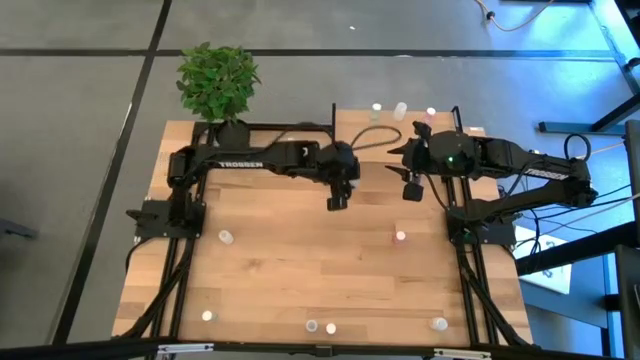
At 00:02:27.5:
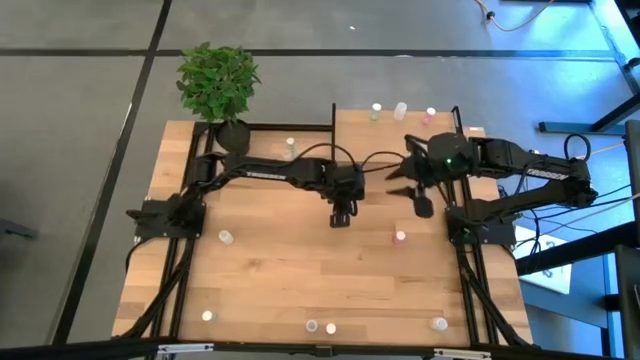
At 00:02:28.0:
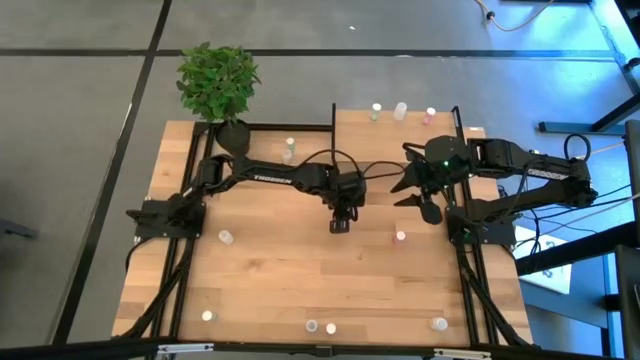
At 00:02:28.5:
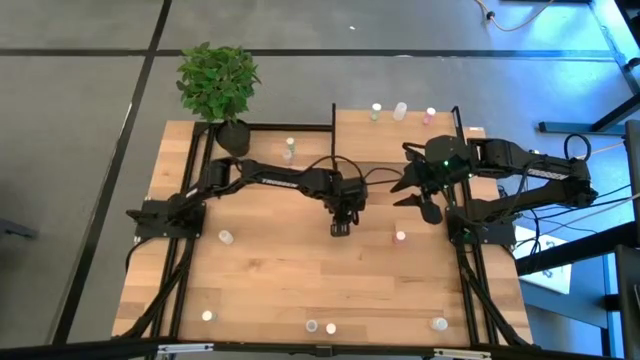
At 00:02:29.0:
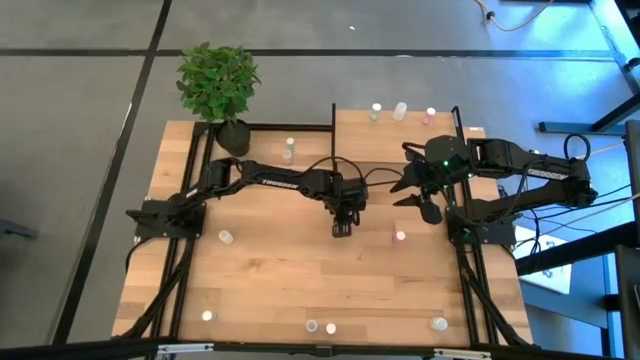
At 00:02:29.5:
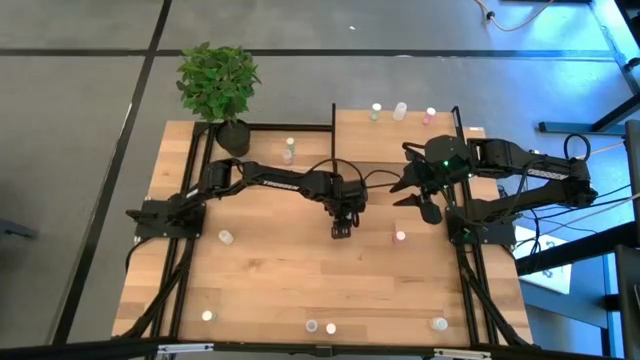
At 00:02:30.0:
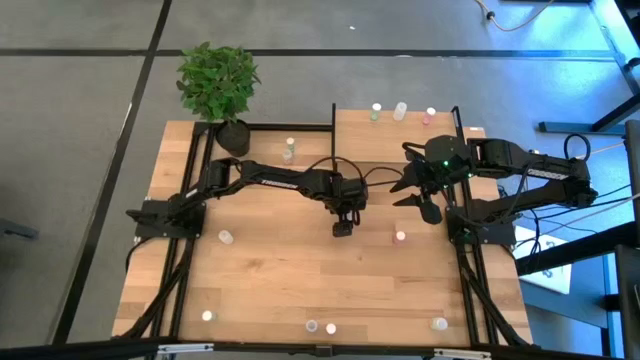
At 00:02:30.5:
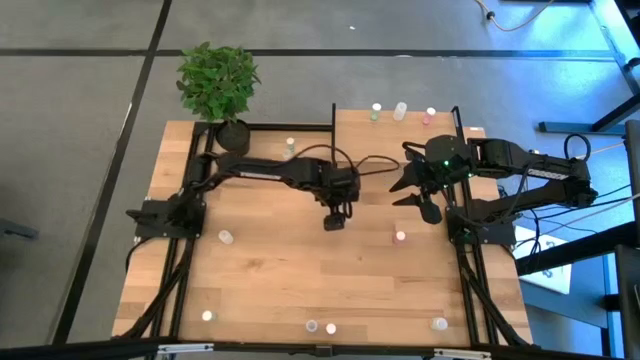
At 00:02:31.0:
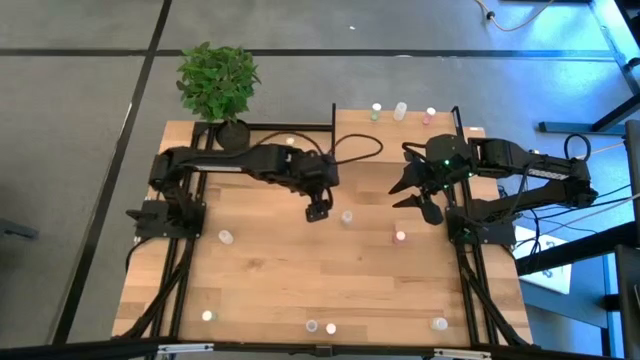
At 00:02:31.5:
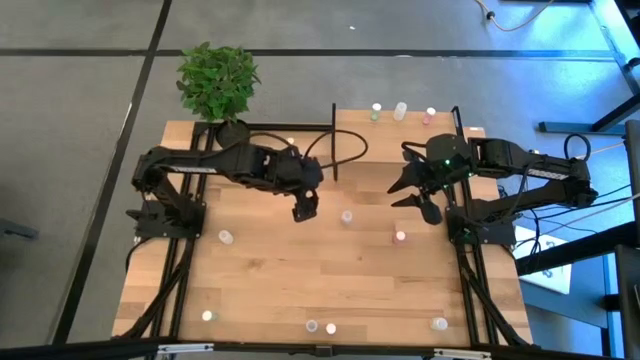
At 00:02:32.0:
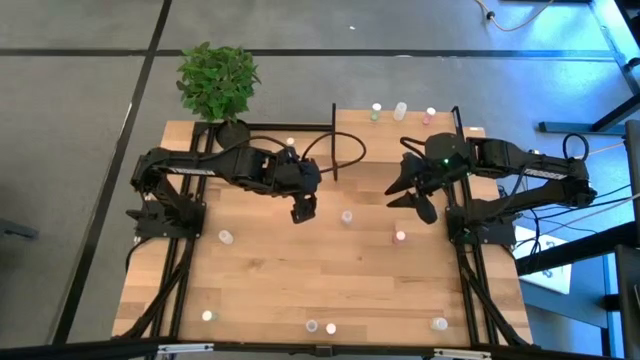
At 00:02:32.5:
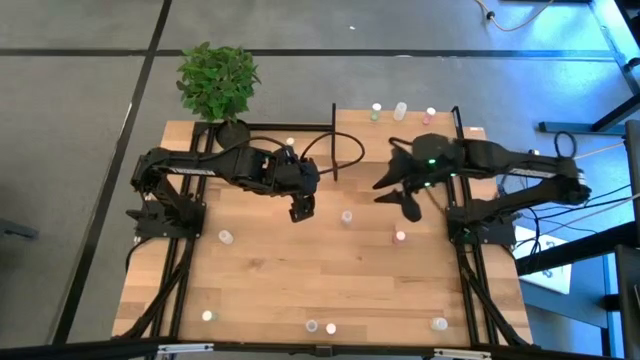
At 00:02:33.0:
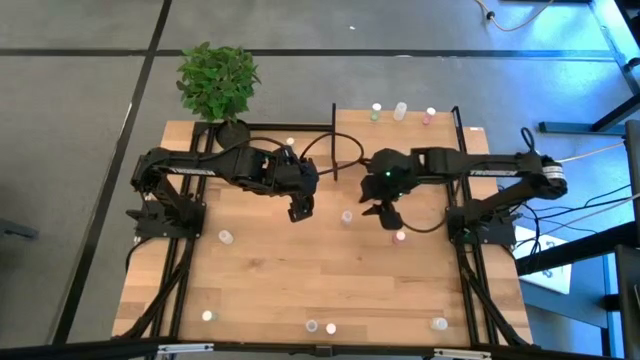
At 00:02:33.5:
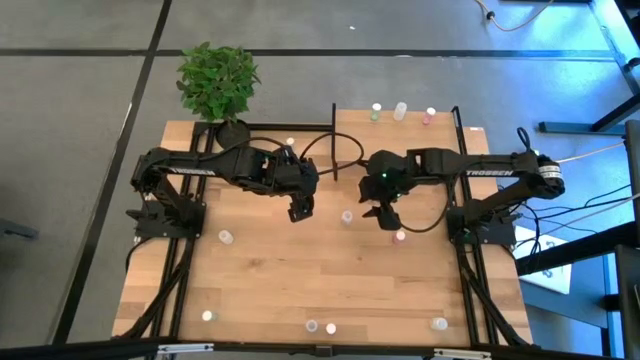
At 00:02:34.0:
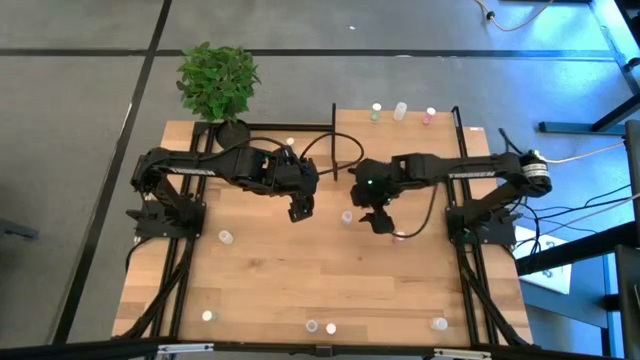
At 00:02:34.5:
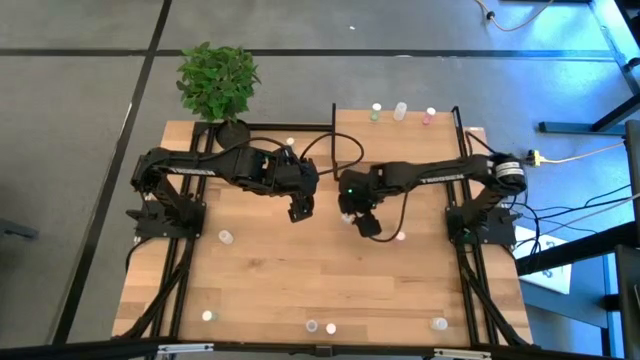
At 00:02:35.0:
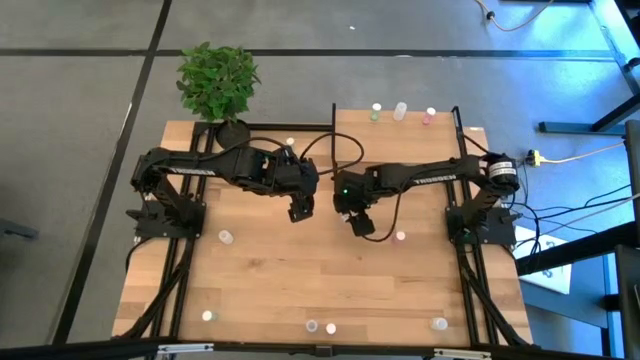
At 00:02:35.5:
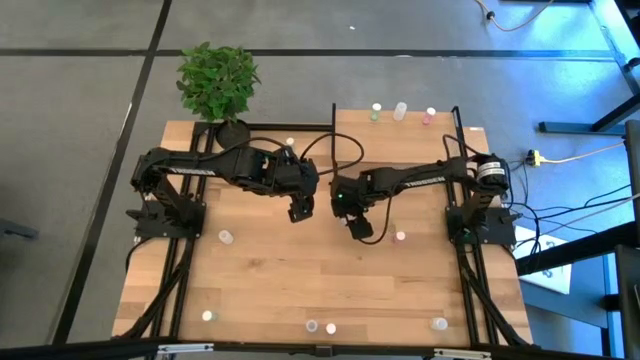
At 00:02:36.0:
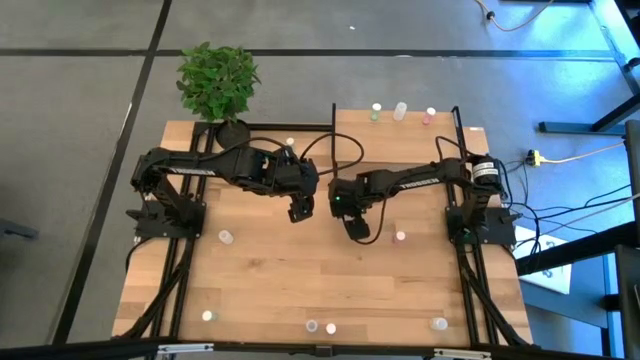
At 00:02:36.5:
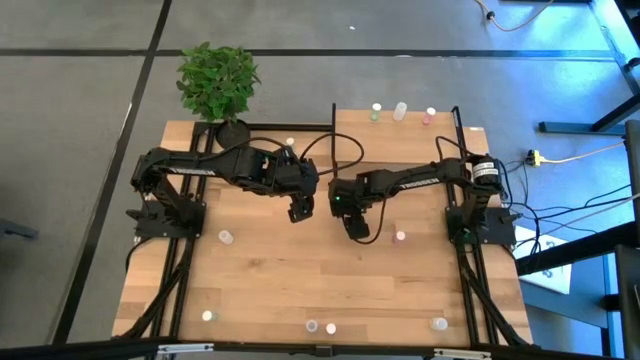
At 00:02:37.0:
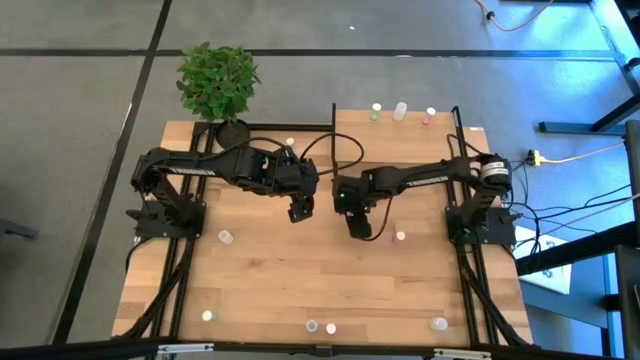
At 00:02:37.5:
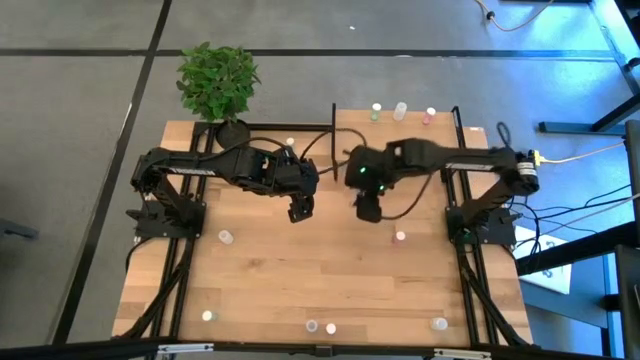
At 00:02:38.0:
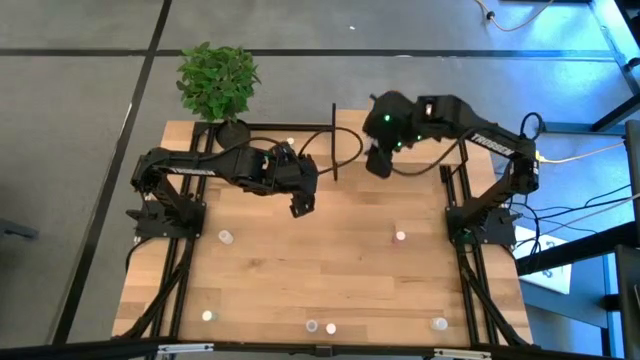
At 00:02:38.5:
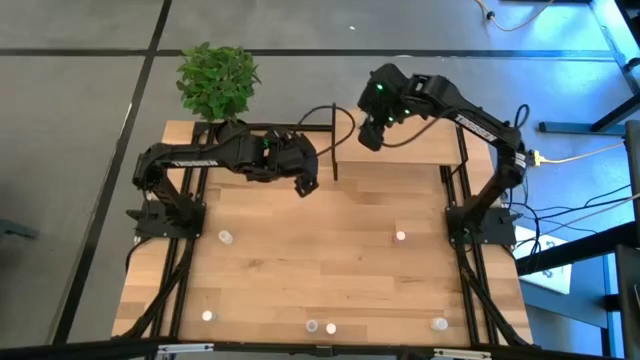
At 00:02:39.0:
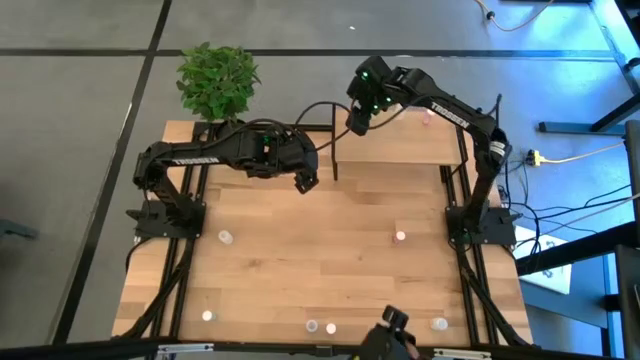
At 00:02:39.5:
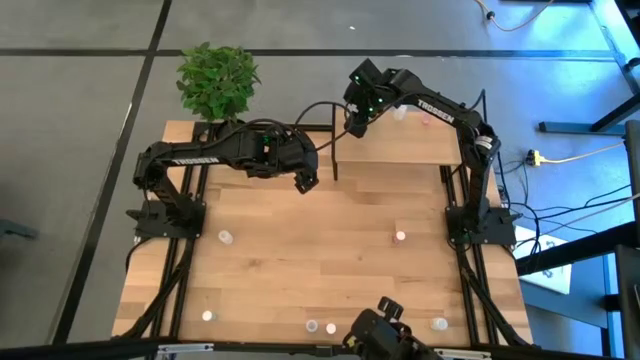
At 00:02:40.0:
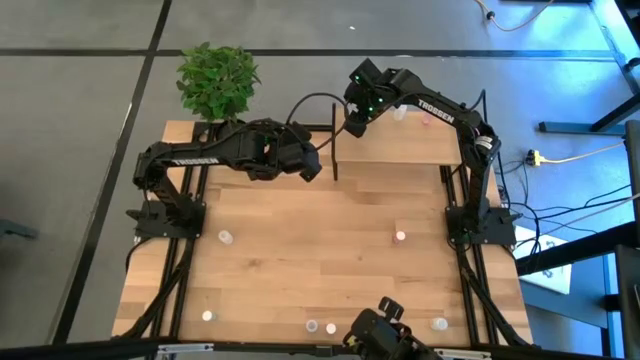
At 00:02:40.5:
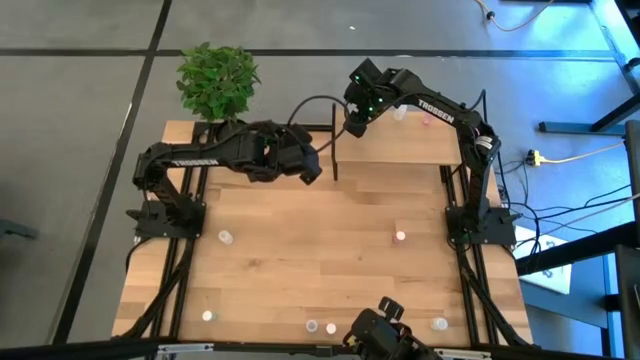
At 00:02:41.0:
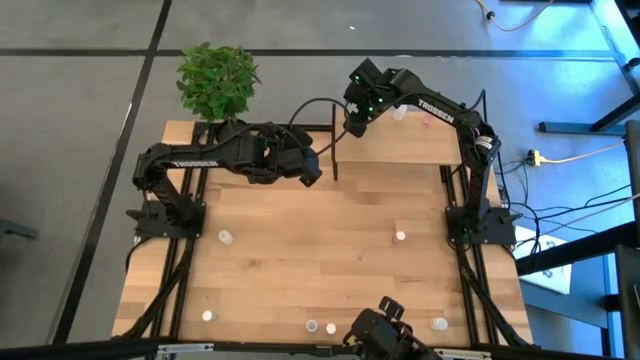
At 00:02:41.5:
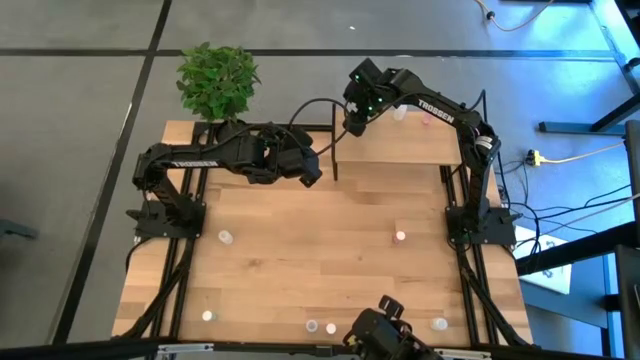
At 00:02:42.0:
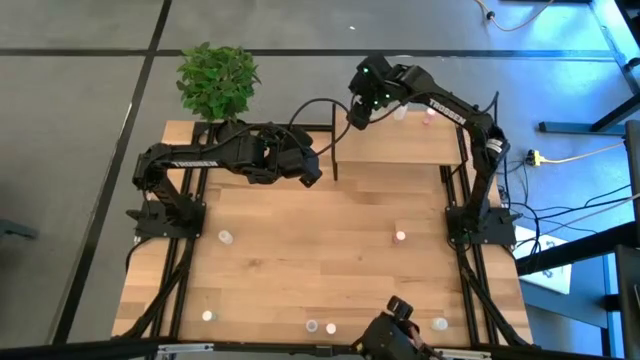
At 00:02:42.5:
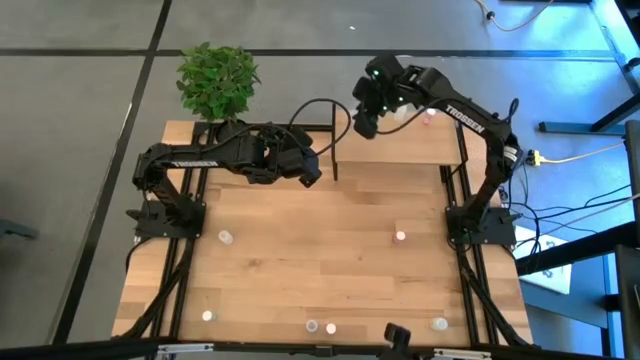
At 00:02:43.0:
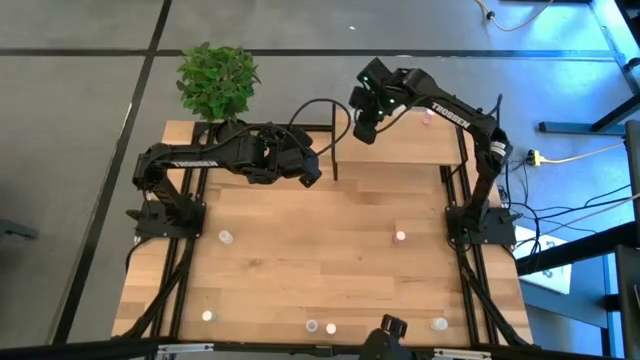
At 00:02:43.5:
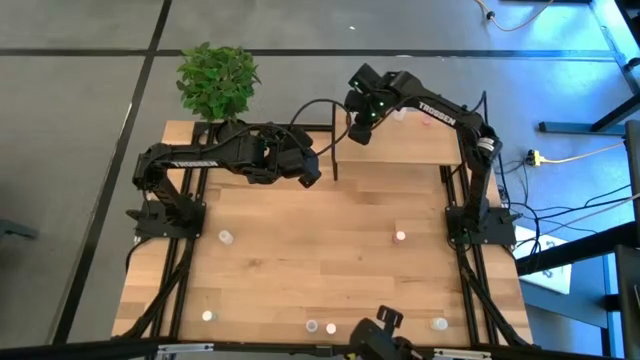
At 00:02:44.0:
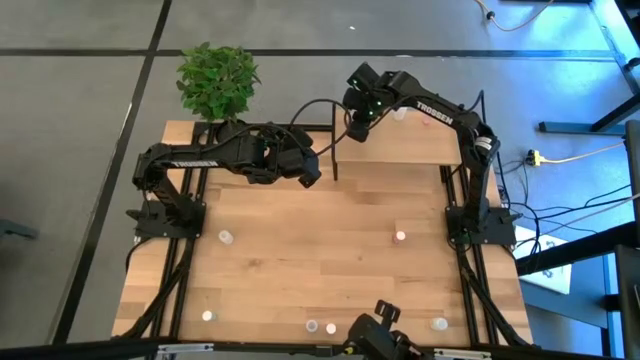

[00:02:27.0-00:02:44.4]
Task: Pick and place medicine bottles onto shelf by color
Put the middle transparent pill bottle on the shelf
